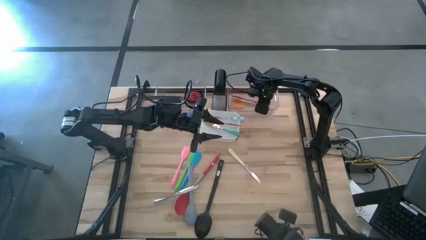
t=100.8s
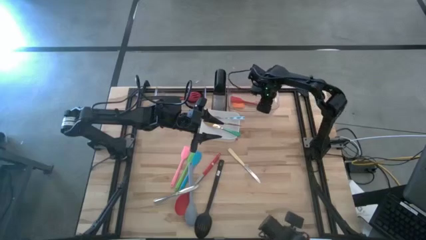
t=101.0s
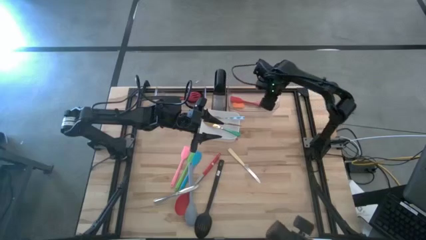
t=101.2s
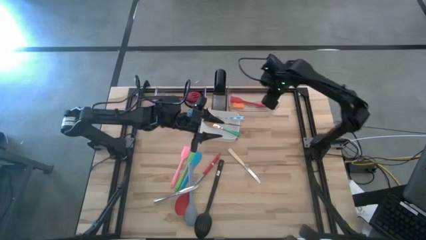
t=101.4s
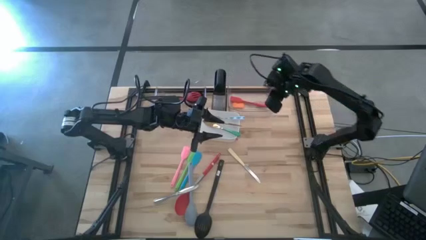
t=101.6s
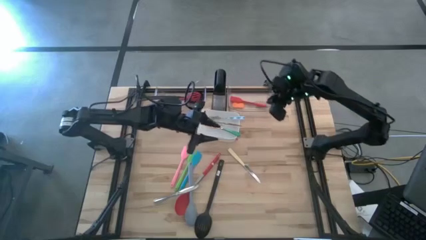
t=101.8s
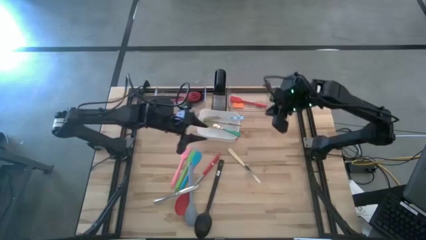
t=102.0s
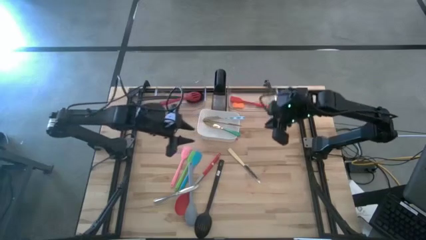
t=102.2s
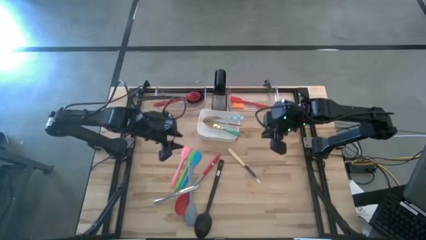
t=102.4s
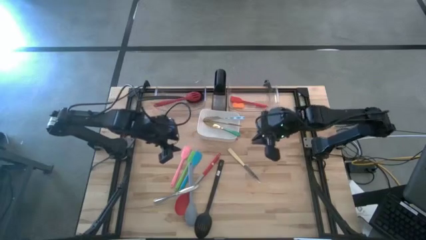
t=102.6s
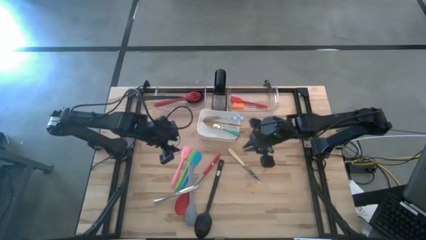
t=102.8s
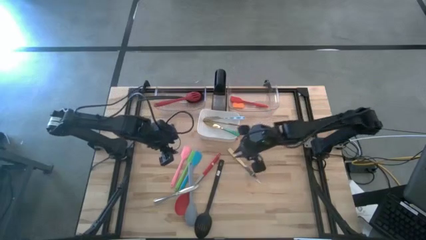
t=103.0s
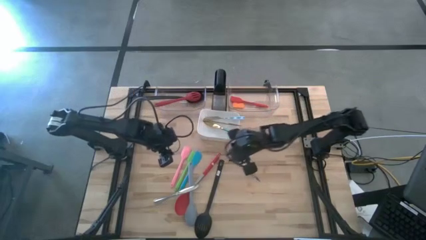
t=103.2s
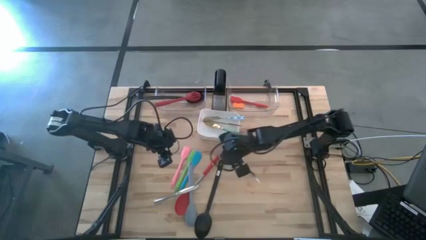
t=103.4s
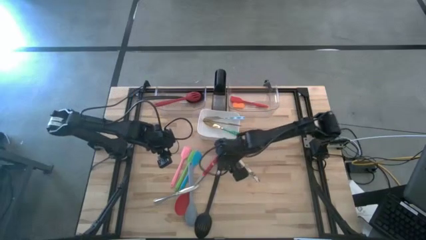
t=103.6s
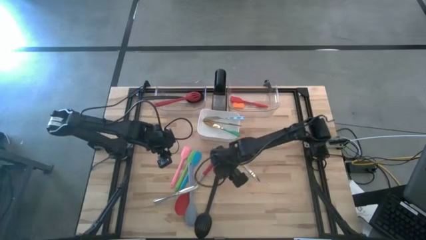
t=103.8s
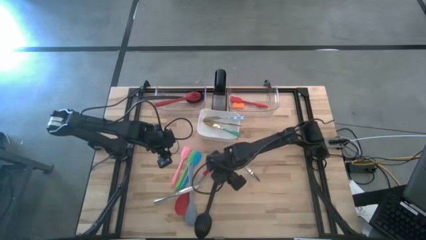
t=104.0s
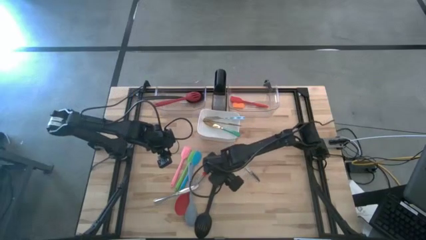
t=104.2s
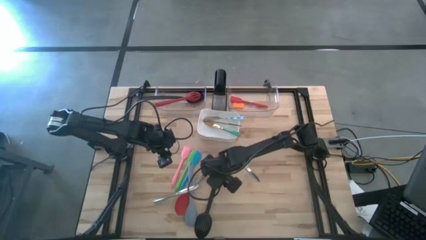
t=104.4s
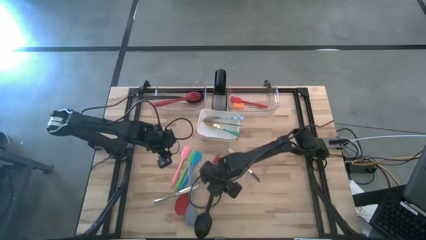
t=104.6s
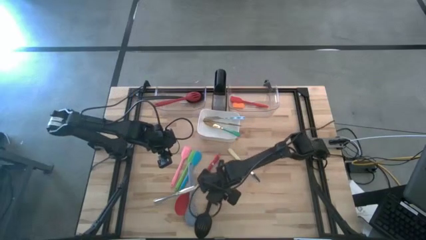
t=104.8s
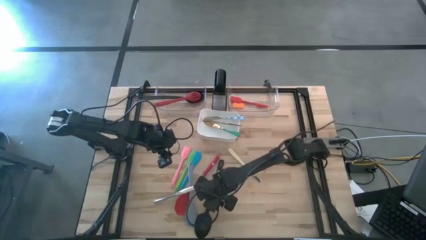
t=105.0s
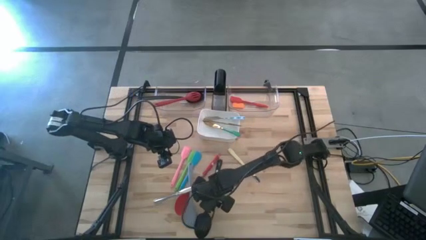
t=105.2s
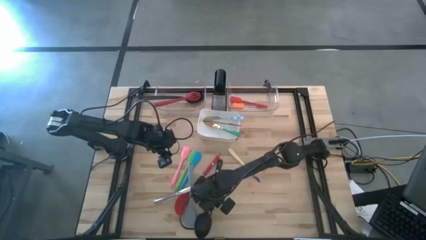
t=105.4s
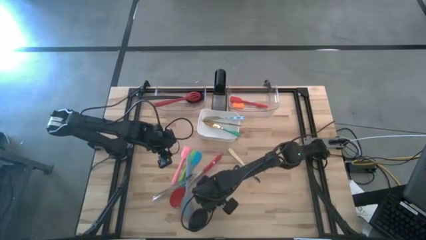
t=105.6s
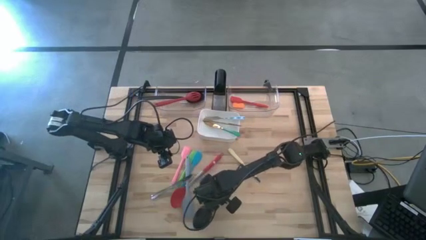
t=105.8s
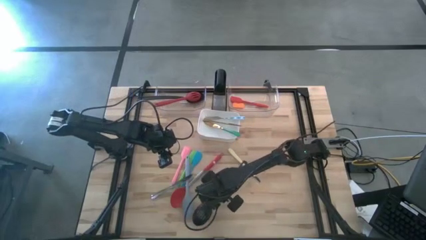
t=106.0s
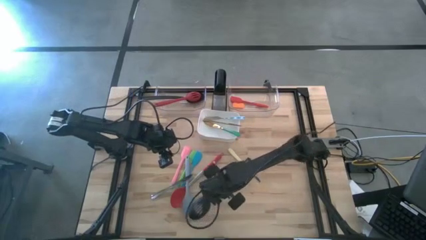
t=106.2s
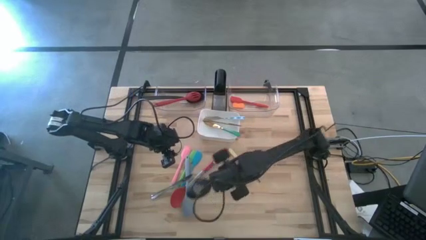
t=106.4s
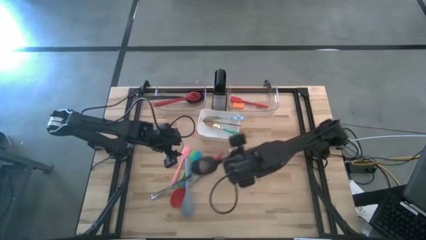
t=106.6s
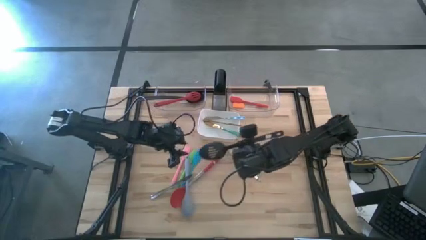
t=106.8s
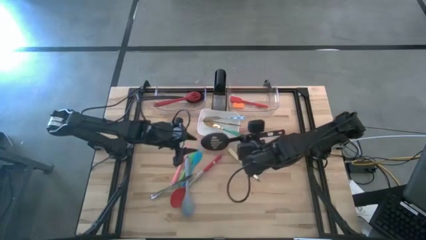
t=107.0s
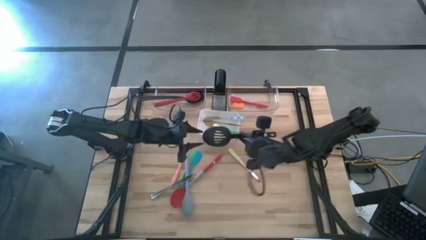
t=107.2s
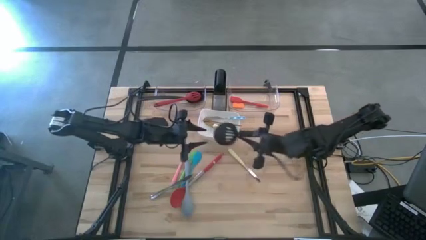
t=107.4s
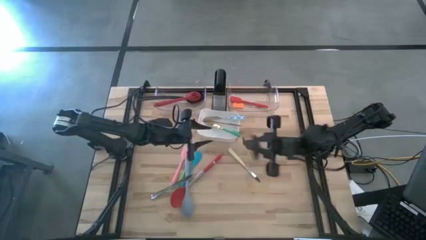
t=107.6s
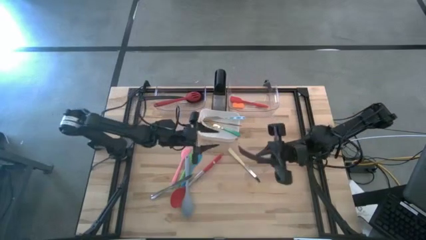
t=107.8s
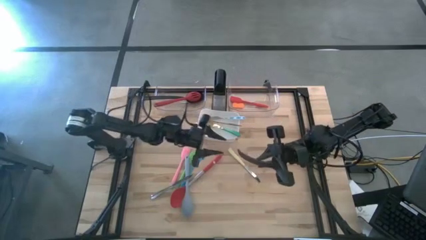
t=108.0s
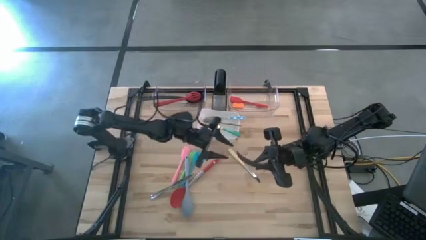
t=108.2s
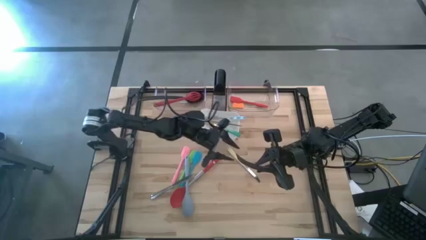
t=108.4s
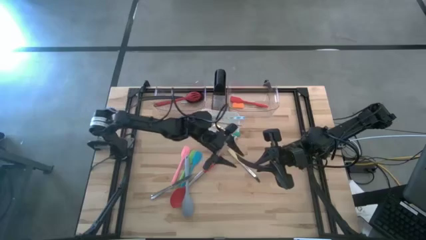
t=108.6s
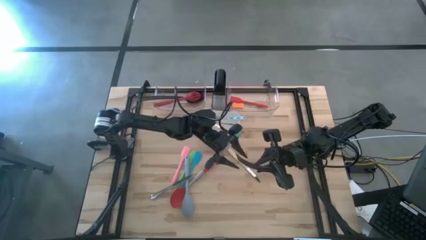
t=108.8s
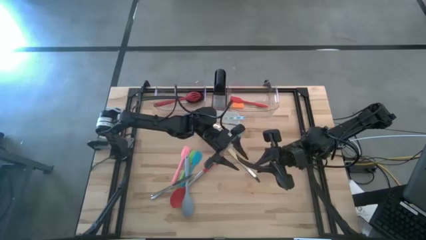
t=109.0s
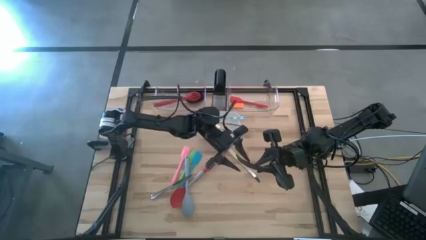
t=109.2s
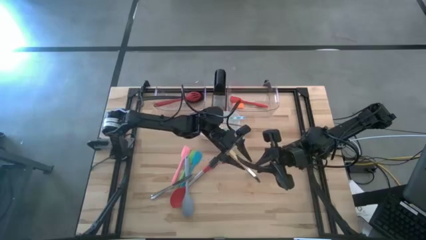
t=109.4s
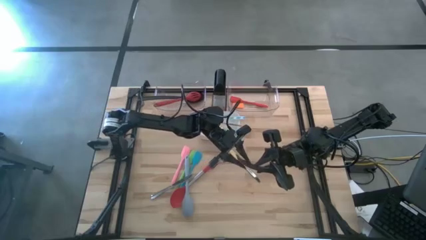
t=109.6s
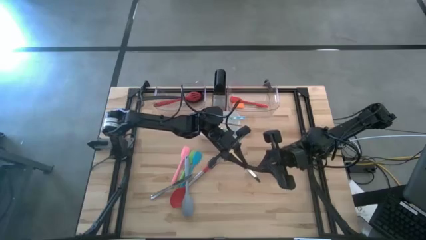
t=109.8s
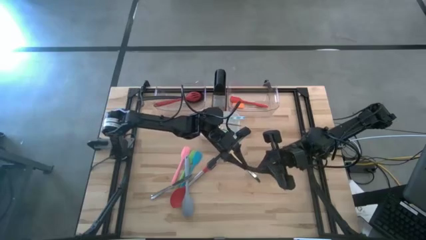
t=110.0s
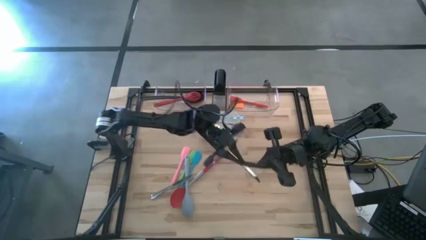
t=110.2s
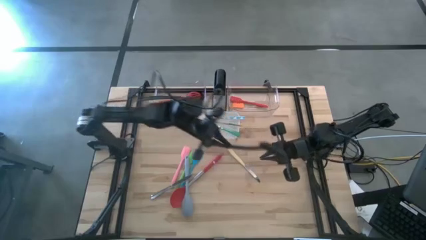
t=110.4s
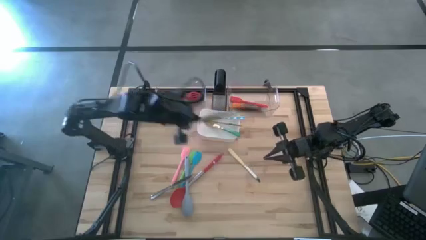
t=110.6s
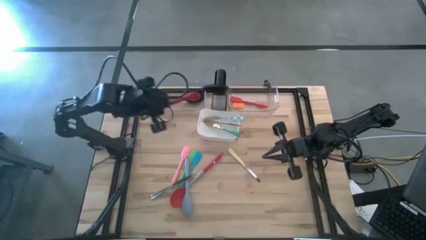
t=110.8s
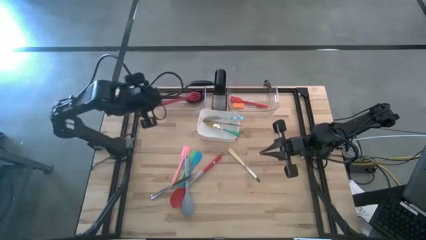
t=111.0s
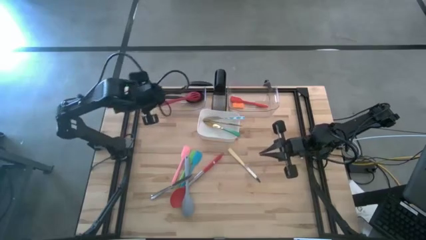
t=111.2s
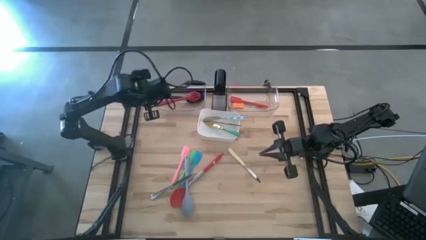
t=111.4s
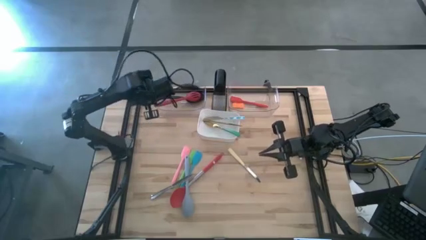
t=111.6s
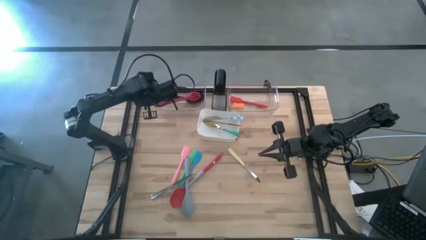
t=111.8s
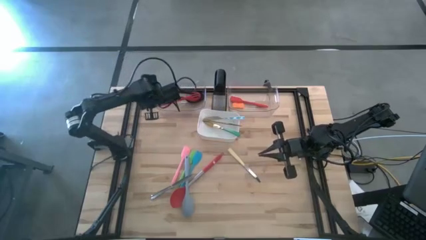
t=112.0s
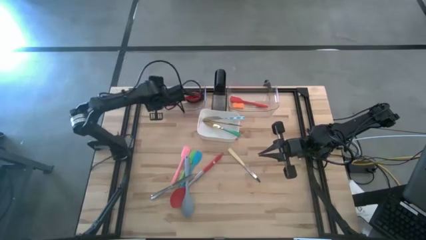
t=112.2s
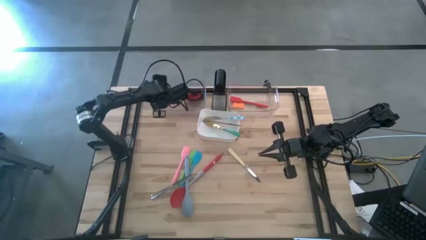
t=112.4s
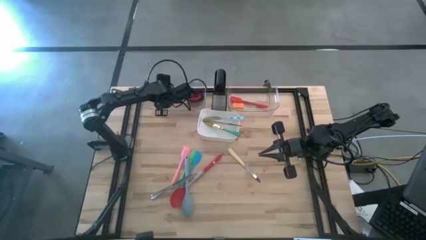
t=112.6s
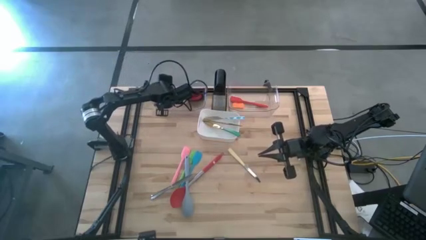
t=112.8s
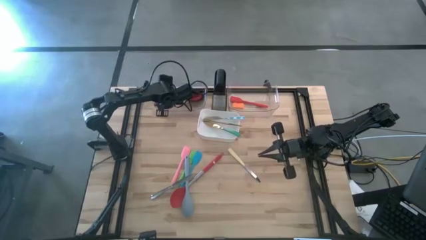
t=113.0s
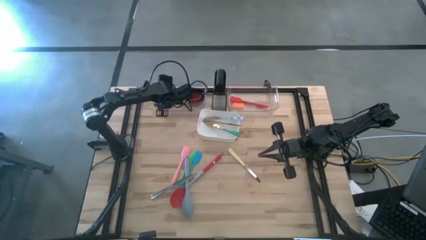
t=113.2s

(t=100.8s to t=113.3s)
Task: Pick & Place Kitchen Items
Put the black slotted spoon into the left transparent bin

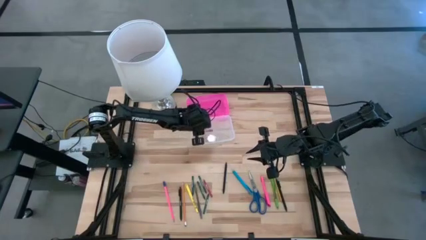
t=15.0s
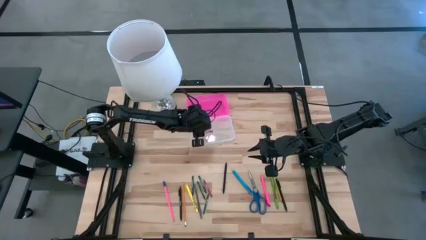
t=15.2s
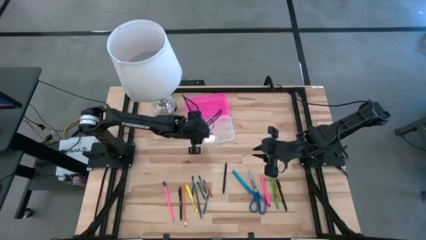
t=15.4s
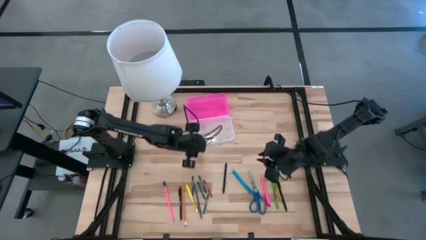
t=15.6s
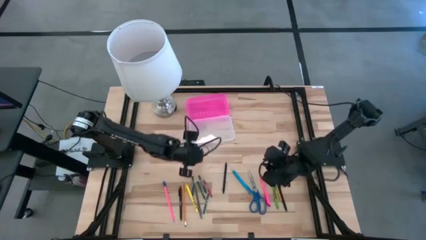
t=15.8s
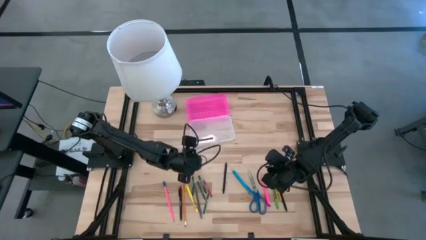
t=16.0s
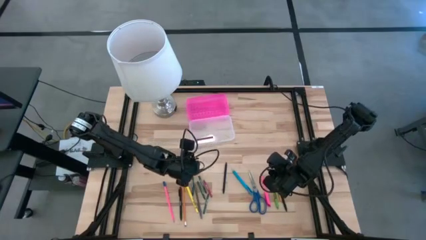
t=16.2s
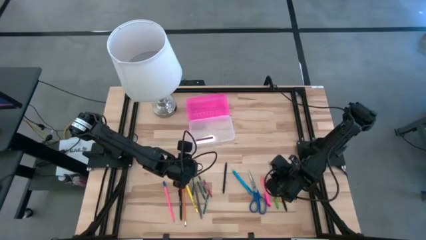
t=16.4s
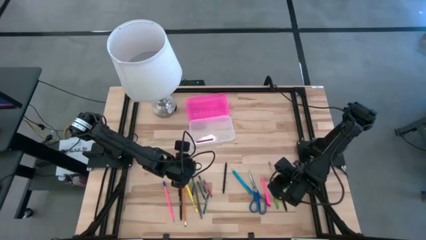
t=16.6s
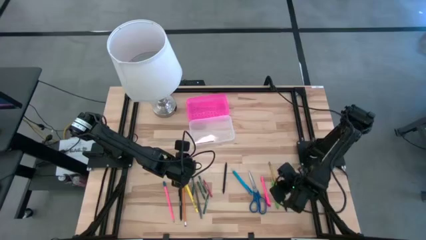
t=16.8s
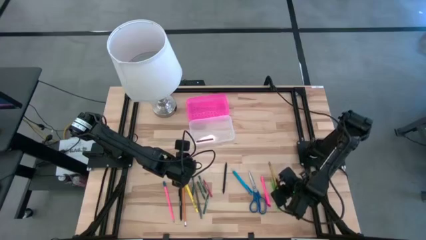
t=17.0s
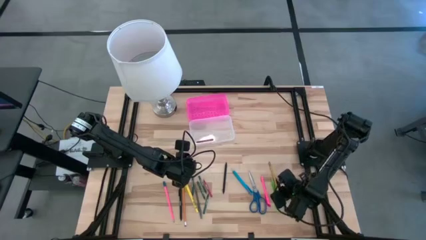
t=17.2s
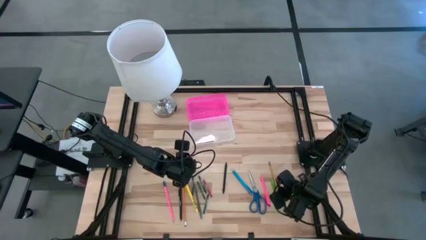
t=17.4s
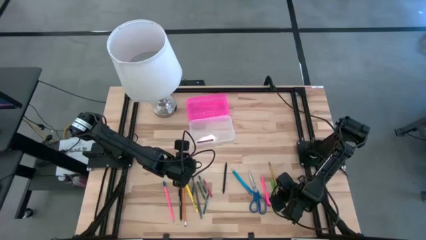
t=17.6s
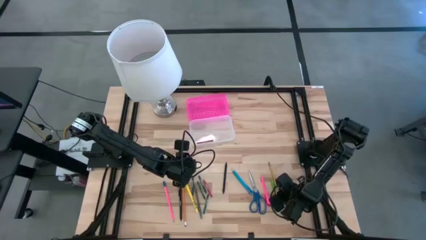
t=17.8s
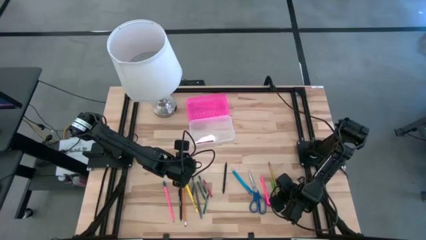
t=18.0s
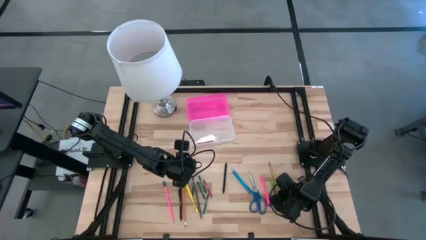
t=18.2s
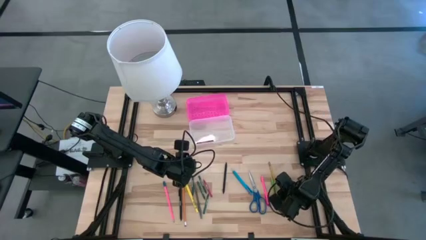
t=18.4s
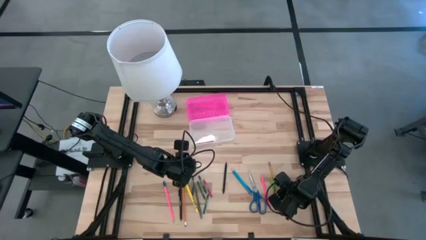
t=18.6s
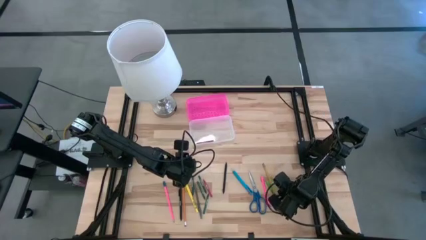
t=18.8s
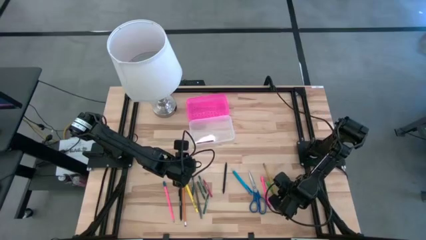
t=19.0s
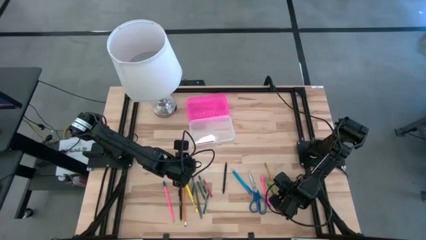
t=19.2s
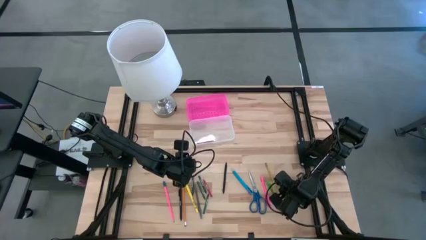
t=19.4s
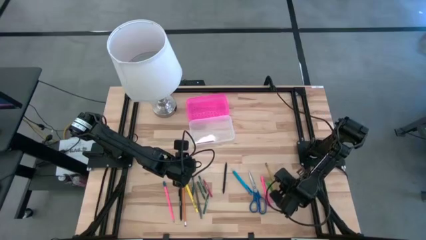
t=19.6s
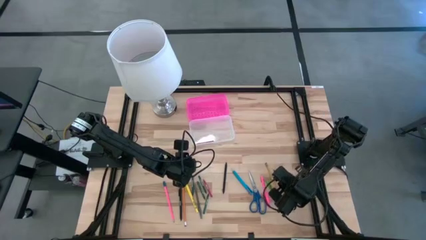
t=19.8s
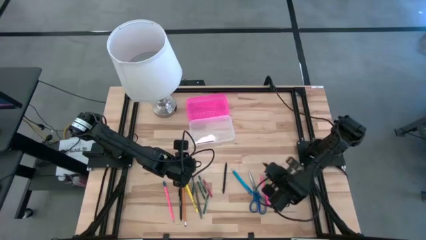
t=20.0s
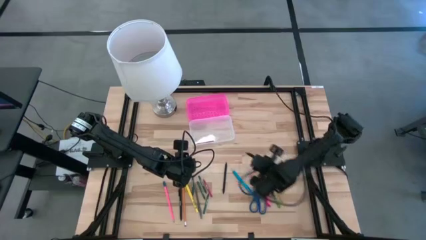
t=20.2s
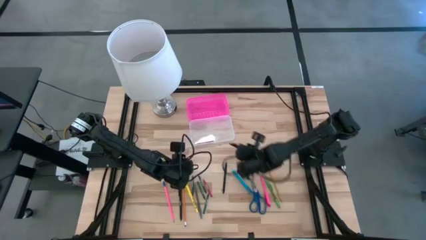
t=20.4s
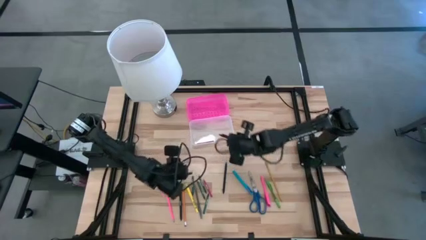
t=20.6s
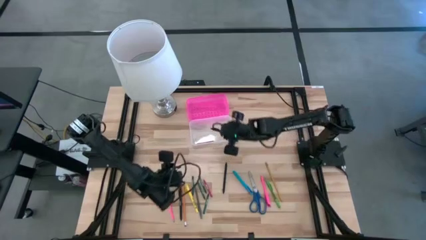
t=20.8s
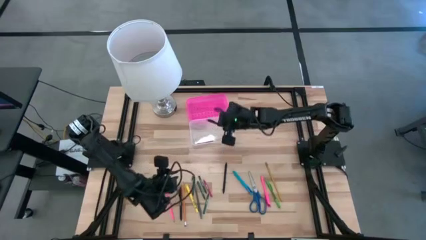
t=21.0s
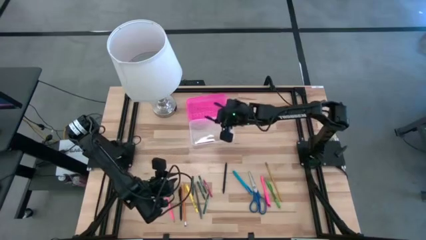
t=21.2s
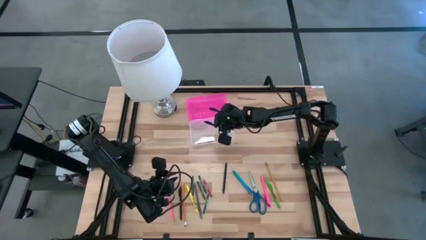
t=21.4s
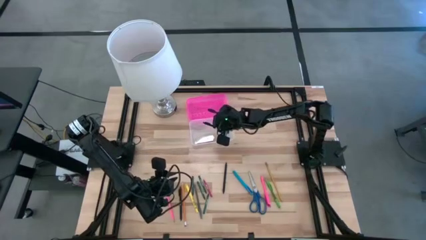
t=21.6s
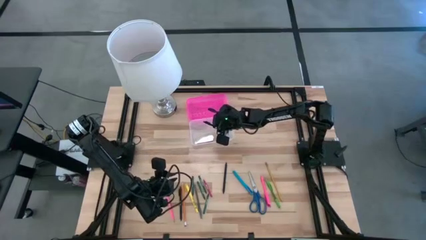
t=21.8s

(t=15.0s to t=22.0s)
Task: Pick & place school supplies into a supply box
Put the black pen into the pink supply box
